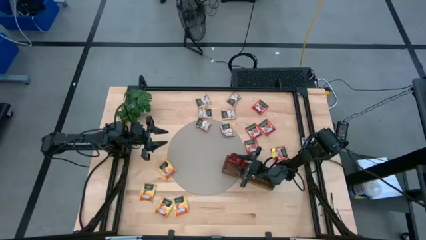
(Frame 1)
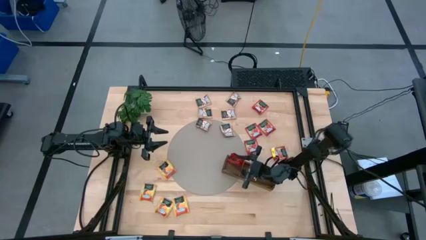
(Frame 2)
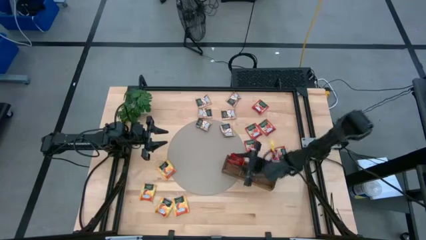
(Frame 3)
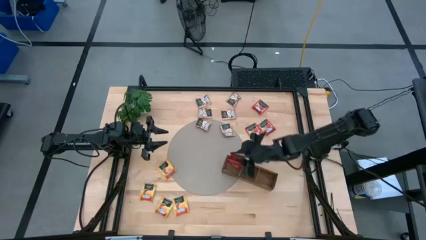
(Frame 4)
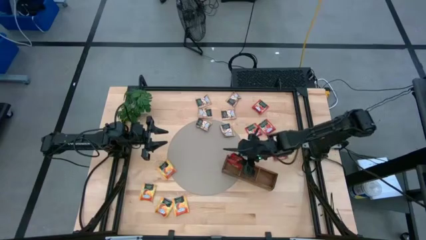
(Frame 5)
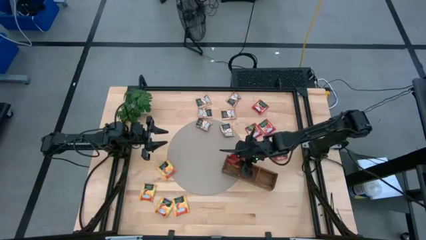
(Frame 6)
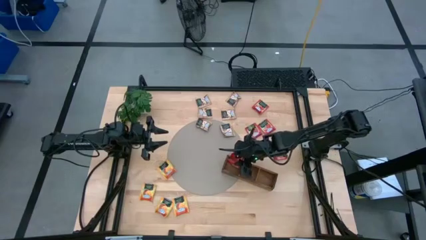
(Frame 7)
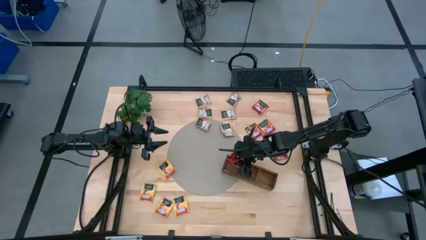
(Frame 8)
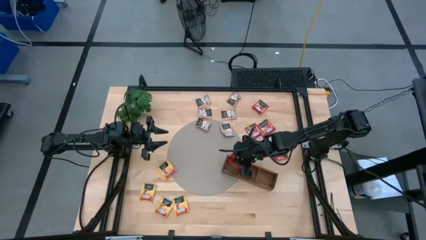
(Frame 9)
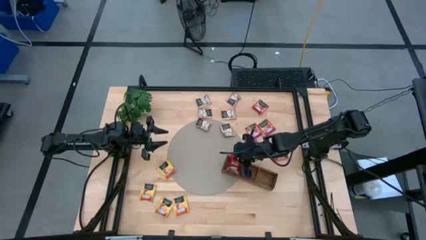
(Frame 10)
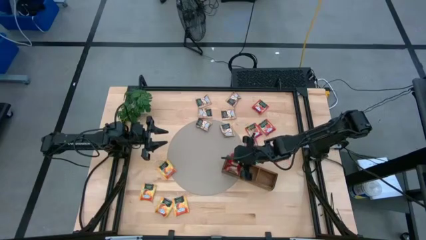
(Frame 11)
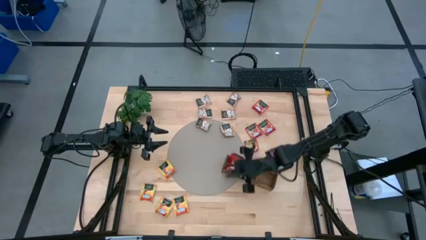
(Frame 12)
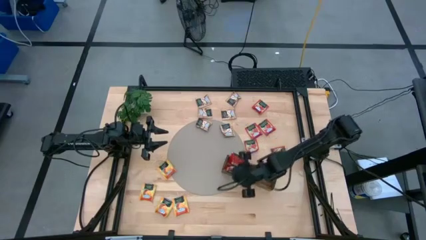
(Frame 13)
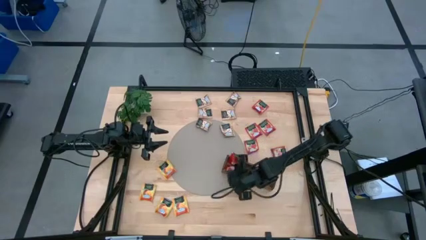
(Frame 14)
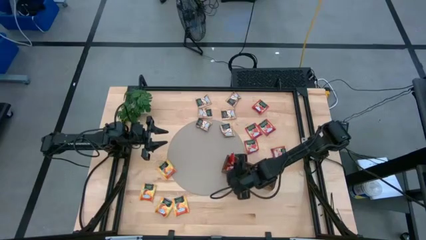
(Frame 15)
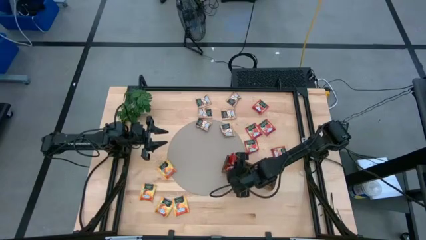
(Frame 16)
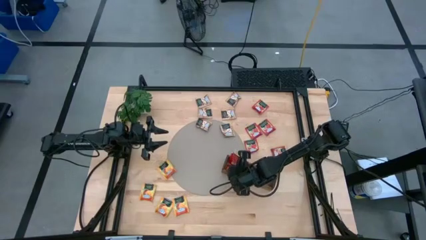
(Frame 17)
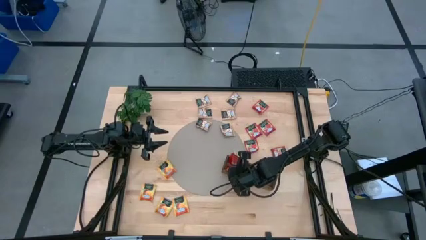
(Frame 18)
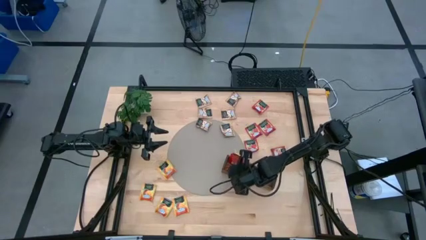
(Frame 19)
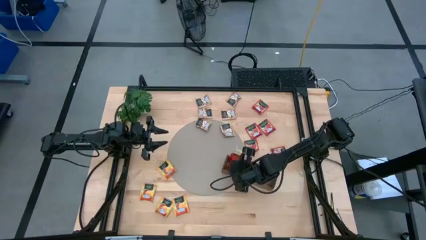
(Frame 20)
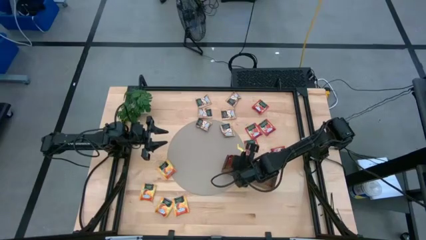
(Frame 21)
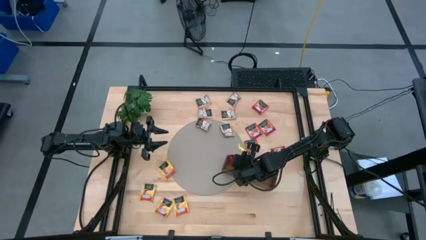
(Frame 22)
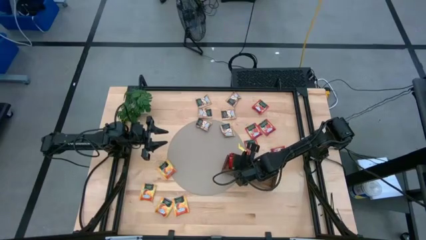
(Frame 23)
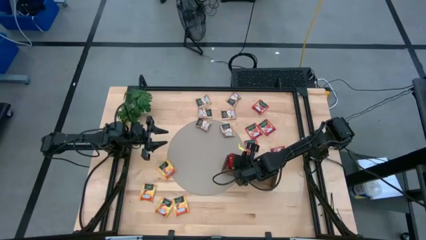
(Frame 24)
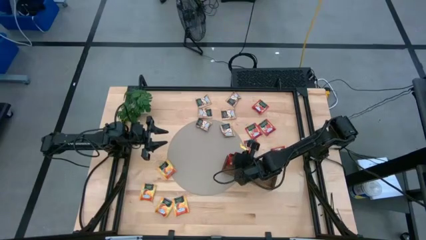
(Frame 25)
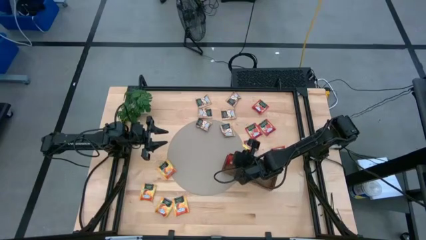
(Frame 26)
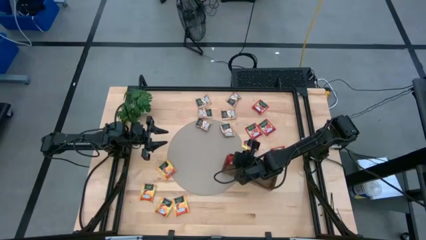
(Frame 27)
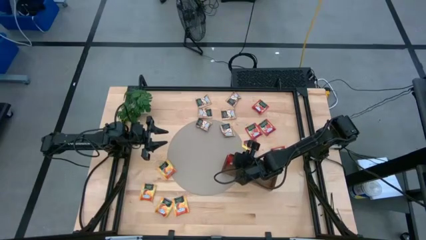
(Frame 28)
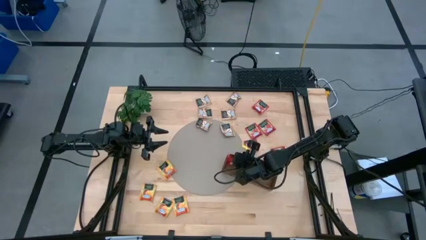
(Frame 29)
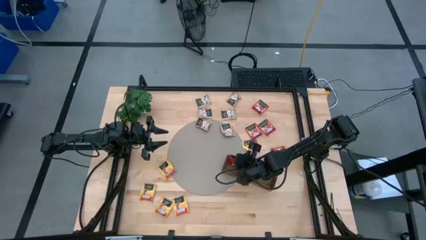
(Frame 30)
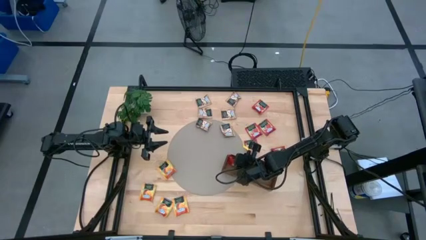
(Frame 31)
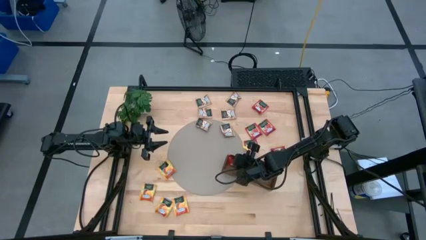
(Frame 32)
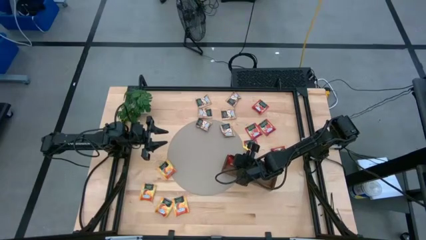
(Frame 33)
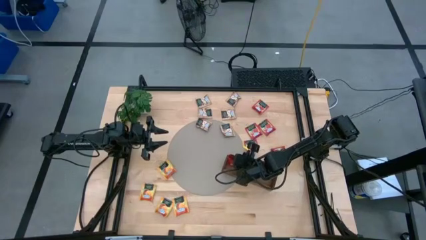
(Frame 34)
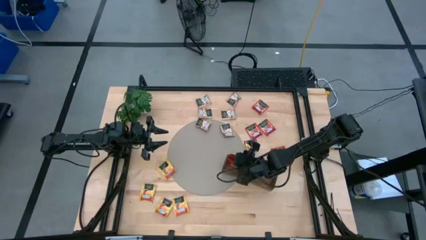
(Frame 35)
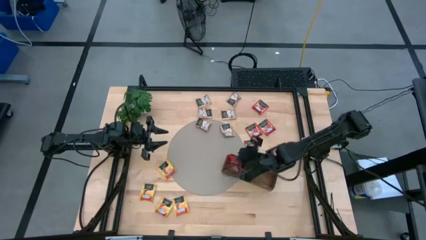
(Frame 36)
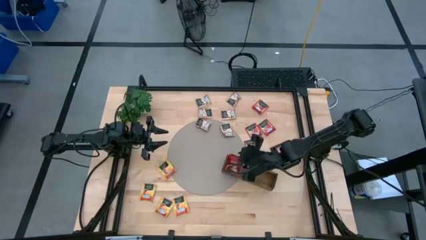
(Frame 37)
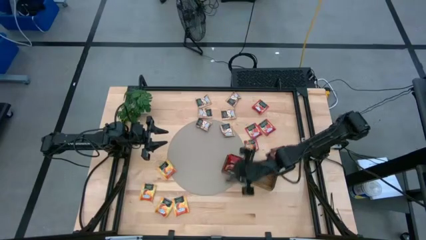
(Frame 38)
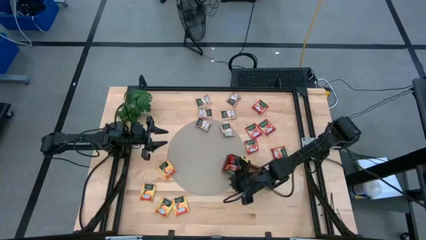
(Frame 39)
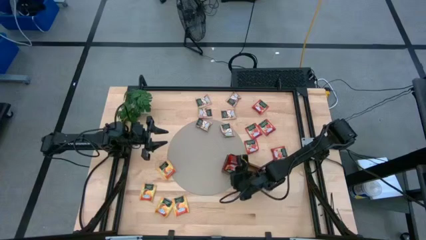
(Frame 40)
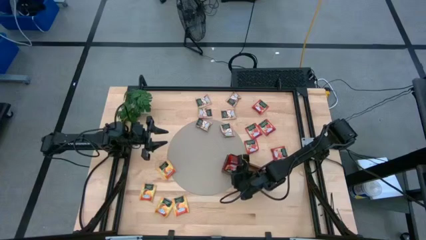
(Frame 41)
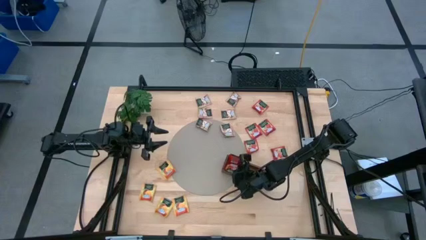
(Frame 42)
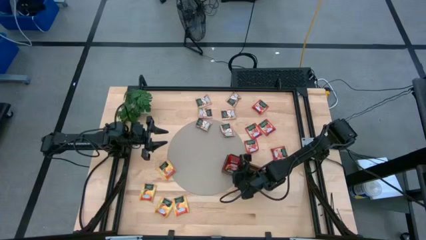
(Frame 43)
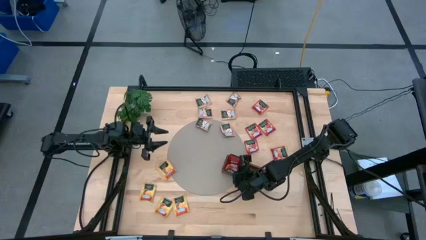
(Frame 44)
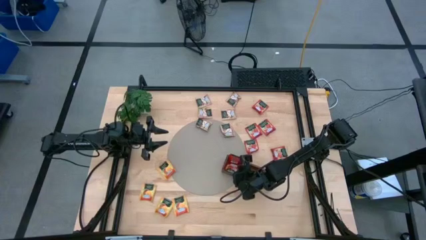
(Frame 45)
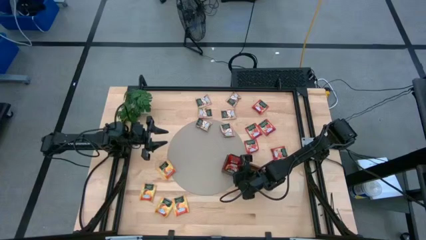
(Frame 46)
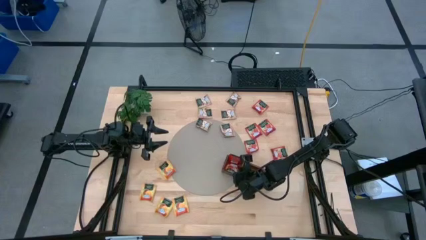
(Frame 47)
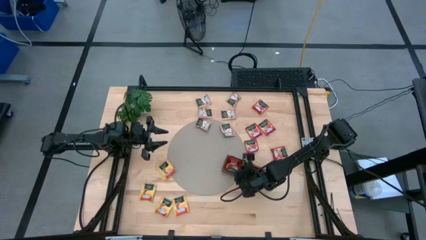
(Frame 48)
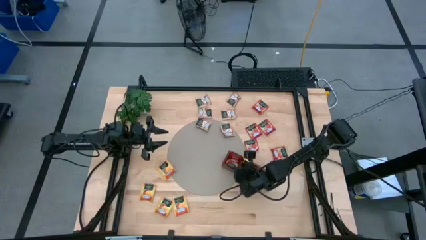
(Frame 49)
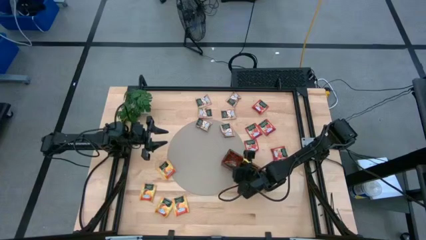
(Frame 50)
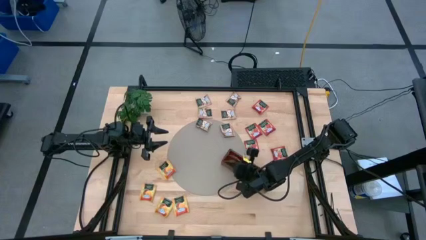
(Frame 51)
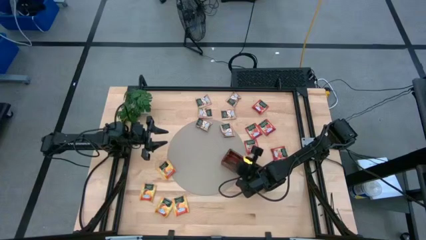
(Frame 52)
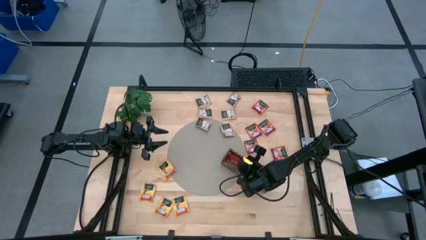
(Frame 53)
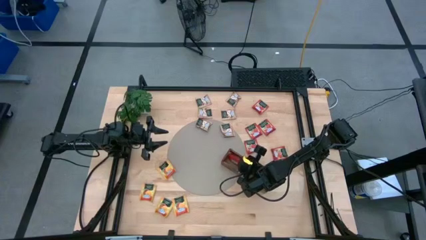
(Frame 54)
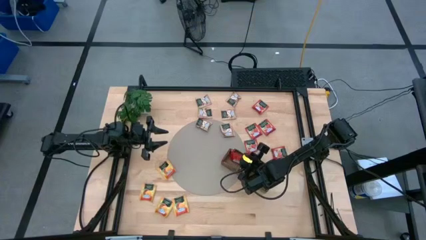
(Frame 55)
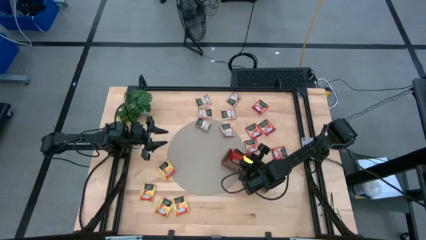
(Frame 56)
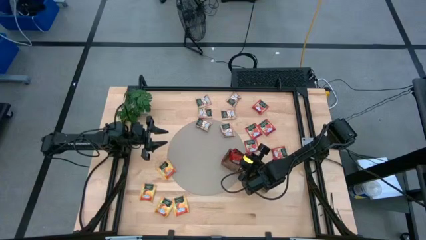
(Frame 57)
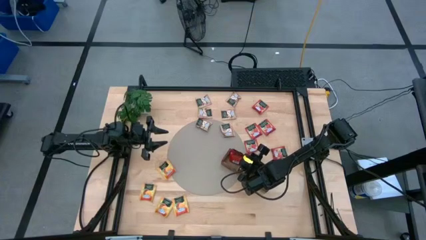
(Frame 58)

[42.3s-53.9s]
Task: Pick & Place Tea
Put the red tea bag into the left section of the wooden organizer
